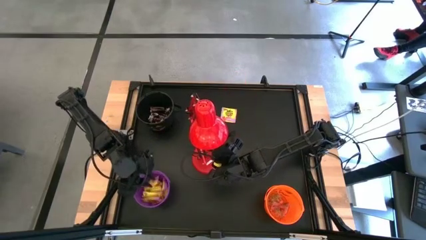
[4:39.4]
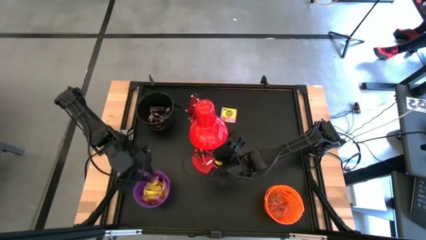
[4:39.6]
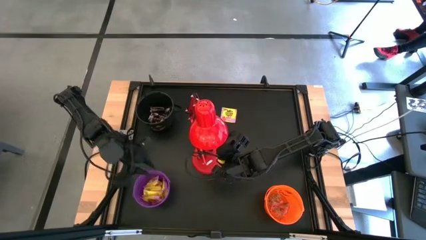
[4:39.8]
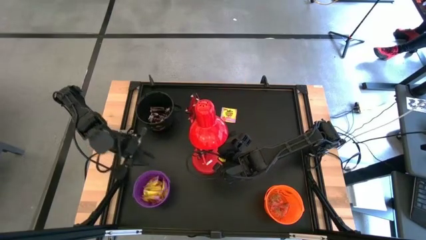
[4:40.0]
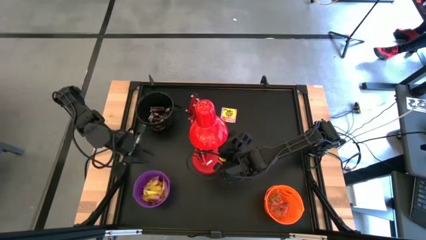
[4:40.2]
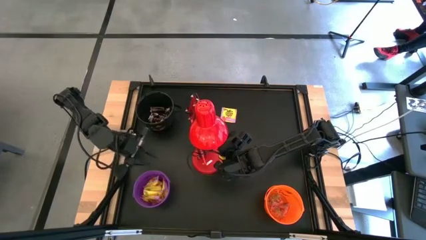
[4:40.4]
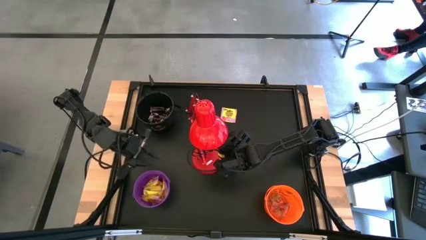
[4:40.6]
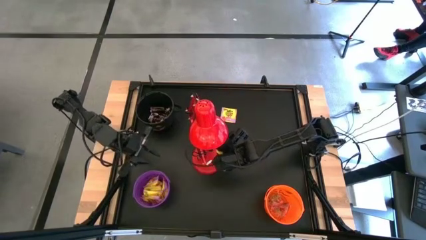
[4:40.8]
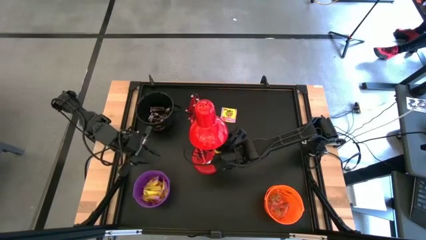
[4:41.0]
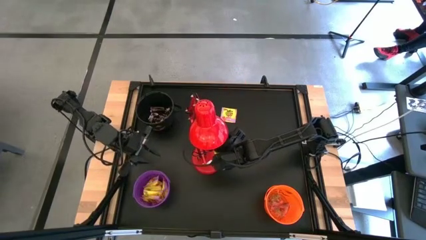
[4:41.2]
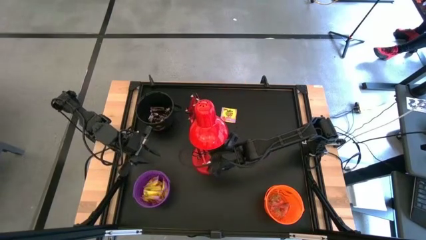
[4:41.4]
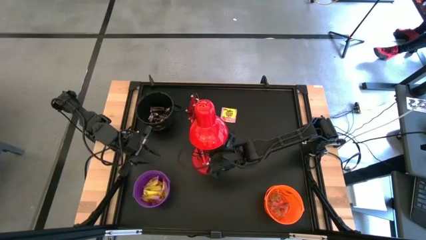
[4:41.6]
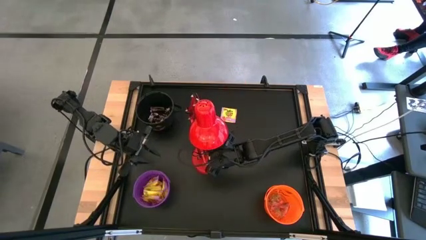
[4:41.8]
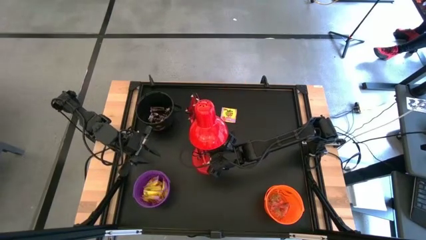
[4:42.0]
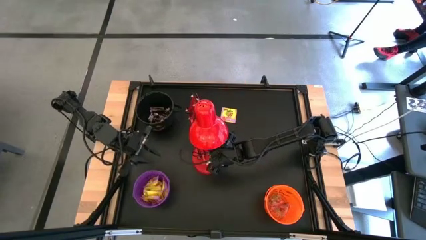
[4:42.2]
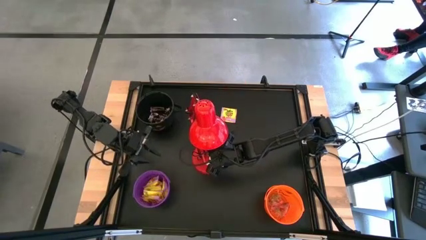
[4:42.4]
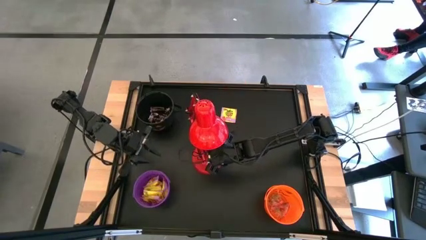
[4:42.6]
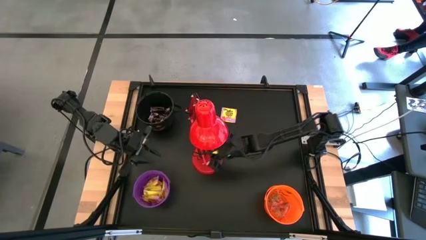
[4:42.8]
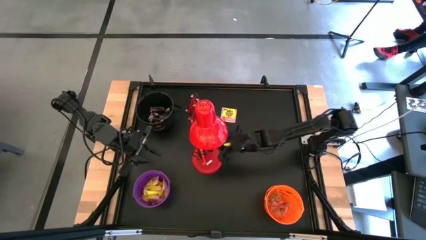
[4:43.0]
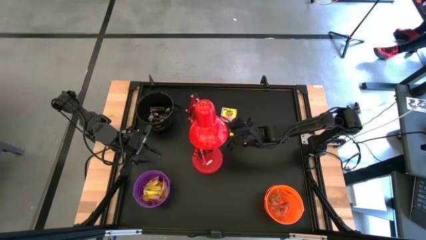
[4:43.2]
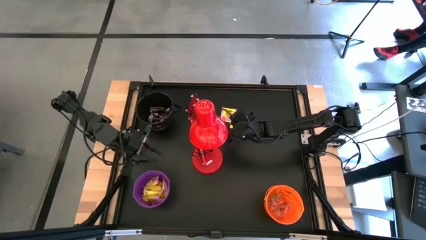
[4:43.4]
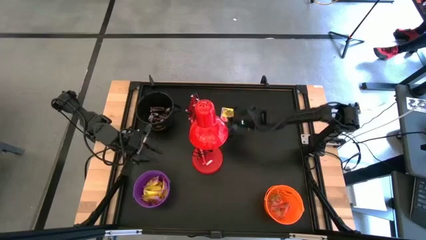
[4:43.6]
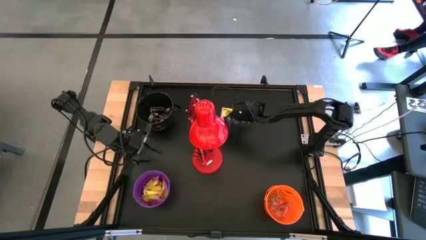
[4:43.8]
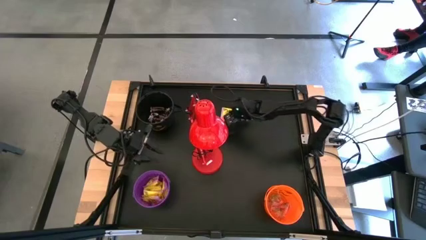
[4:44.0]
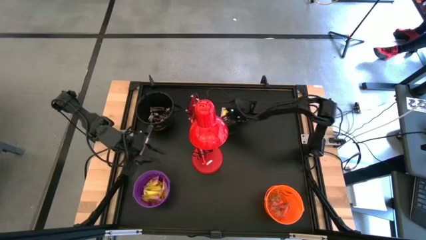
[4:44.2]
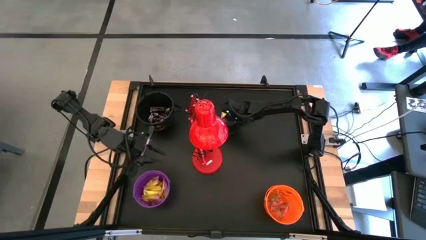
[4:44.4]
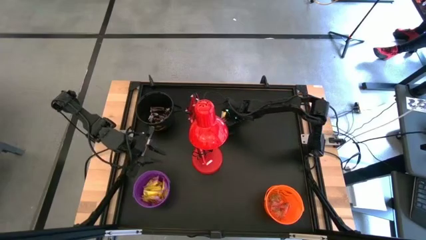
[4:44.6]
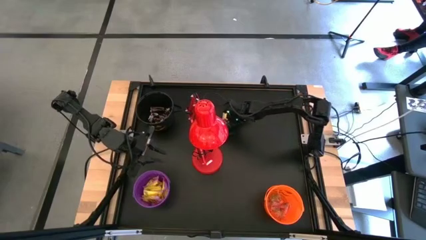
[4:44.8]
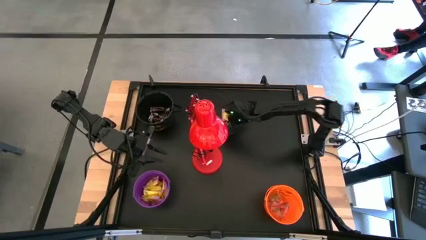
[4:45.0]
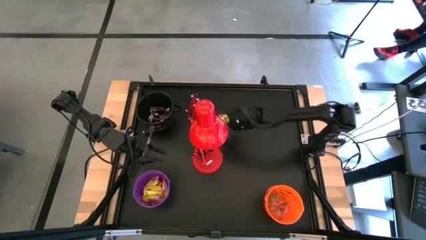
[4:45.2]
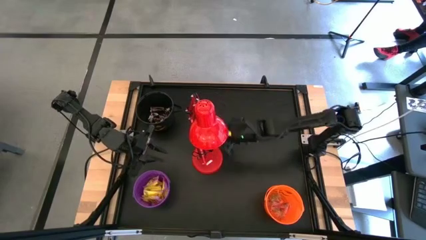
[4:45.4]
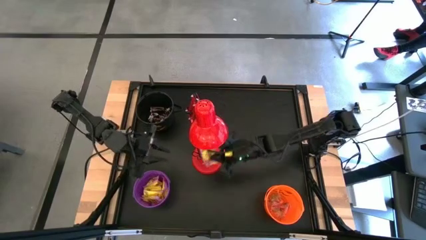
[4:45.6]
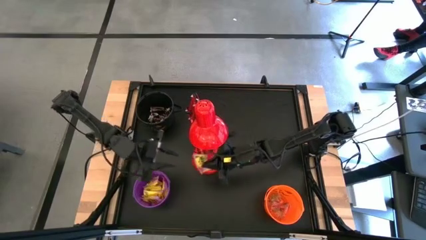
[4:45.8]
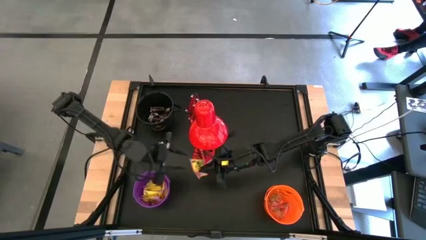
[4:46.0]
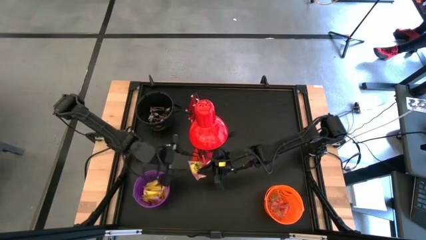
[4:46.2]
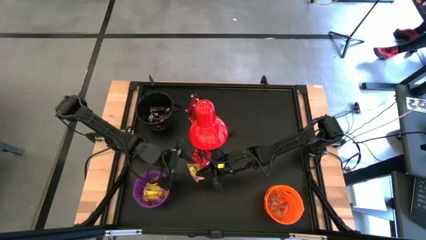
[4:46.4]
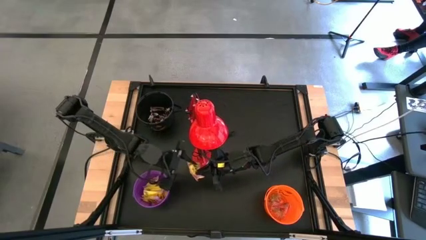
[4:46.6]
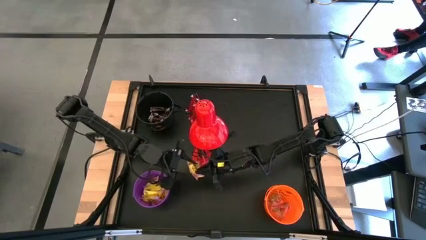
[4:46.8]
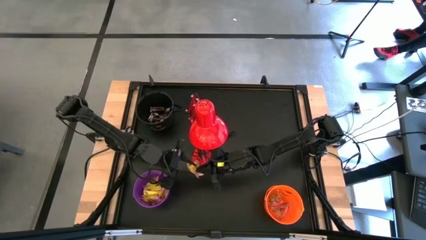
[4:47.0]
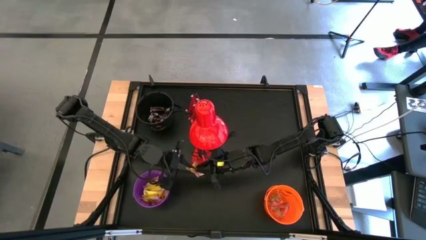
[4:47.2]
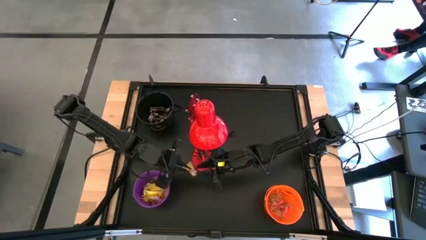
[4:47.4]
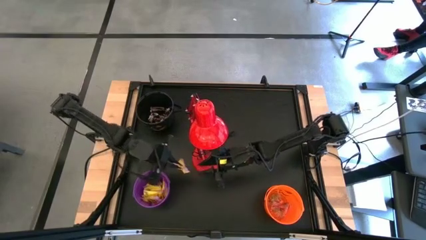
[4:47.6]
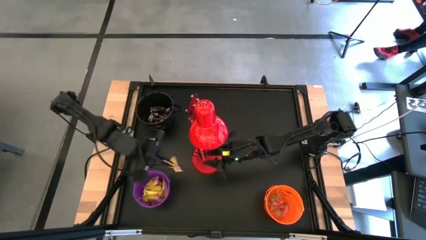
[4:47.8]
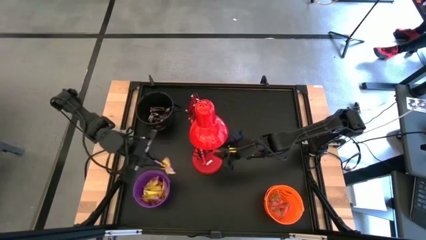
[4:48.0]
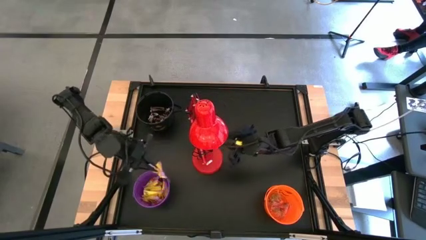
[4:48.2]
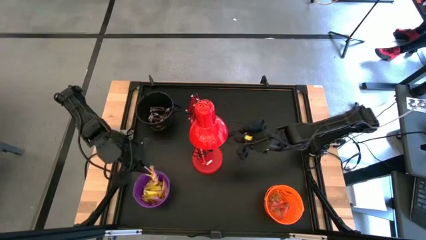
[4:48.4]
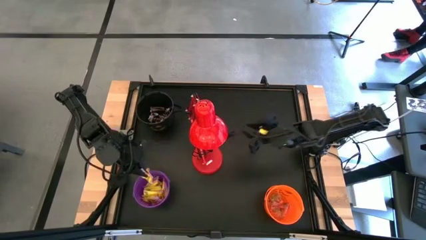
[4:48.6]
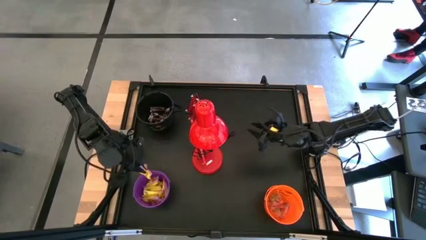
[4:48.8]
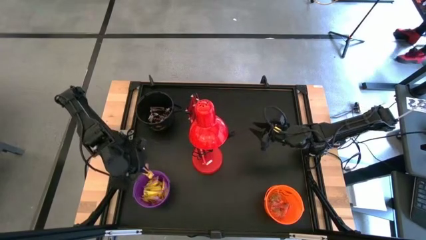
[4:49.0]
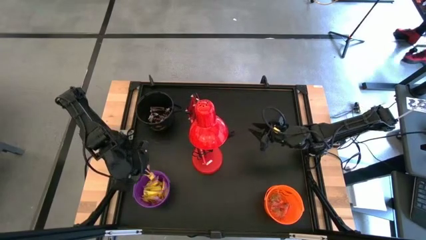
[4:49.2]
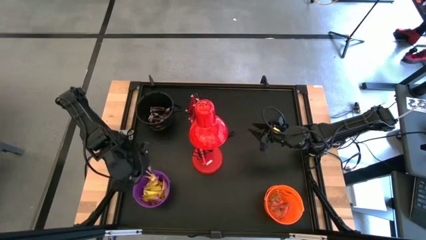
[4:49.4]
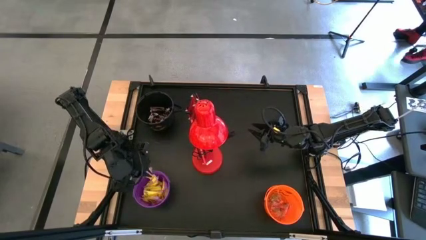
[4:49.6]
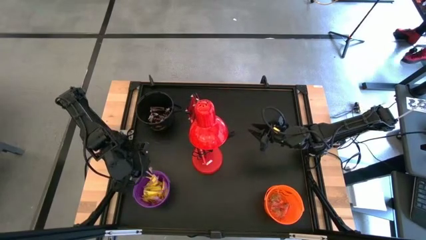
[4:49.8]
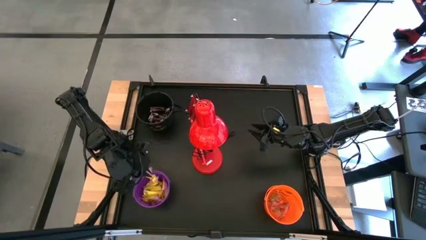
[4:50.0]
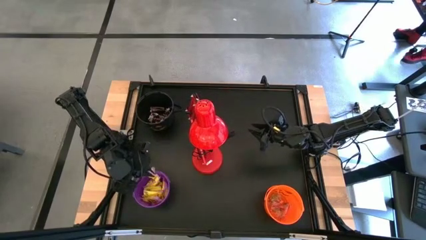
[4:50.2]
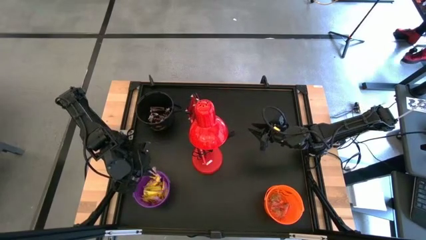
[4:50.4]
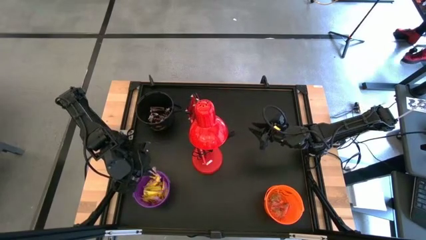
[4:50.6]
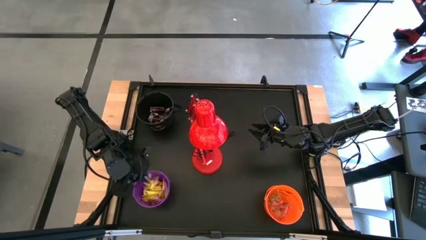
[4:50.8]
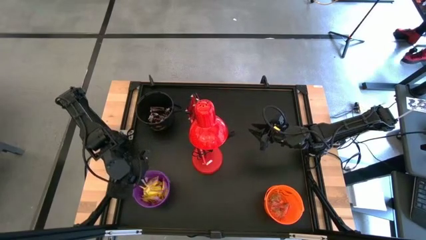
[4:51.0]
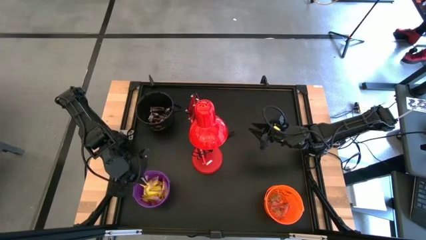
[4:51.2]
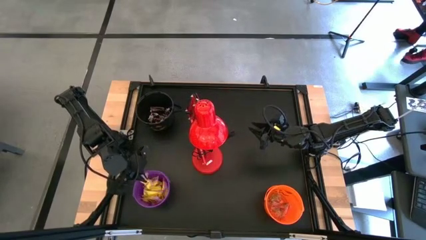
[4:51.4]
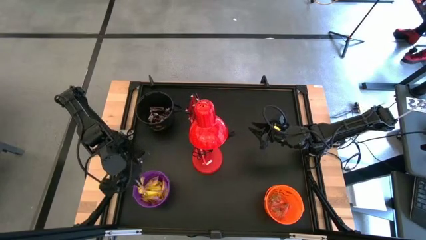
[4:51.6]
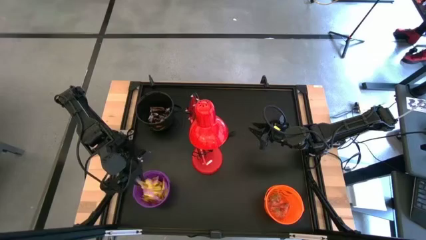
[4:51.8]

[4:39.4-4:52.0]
Task: Organize candy in baskets
Put the yellow candy into the violet bucket
